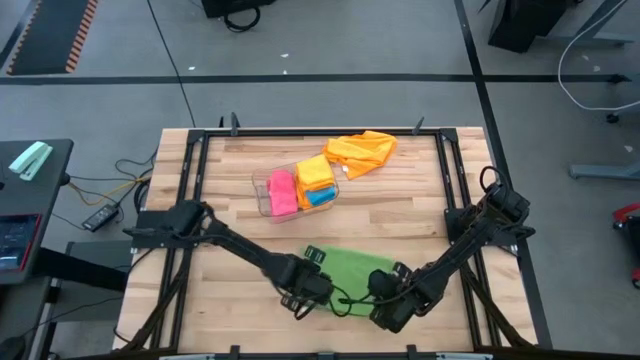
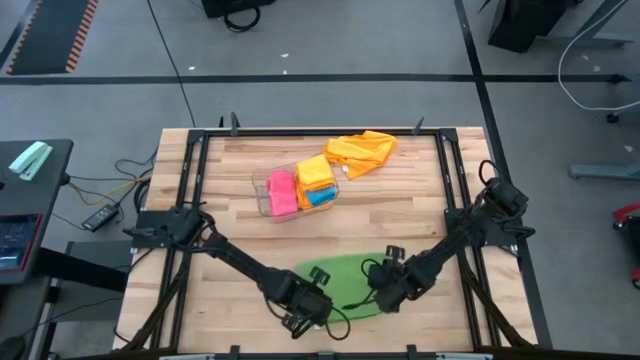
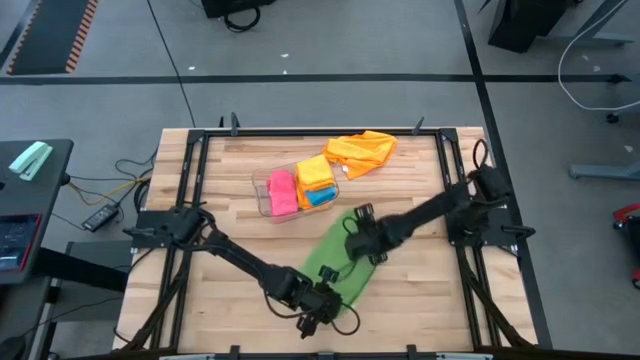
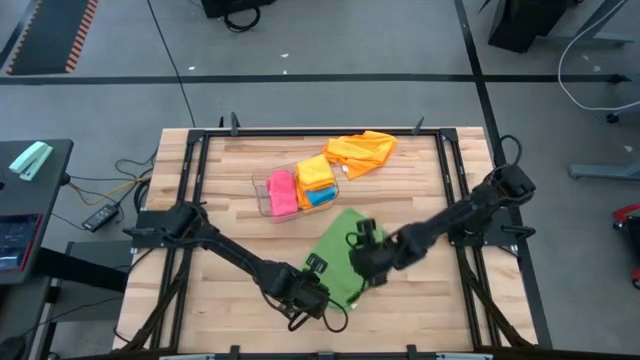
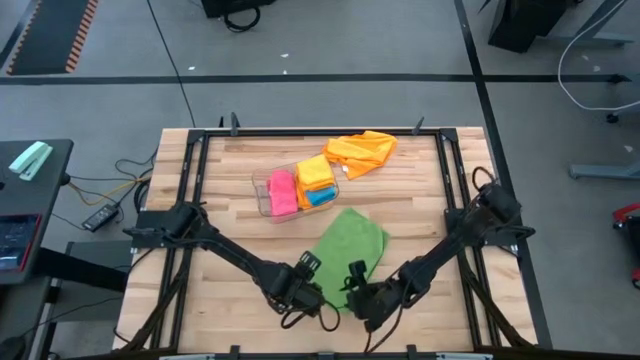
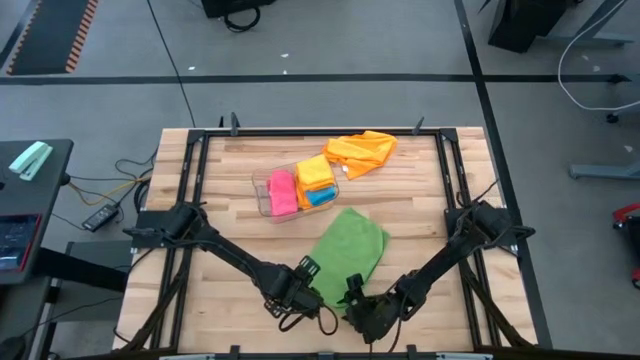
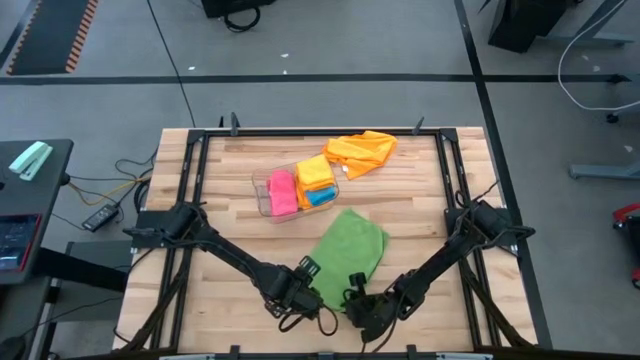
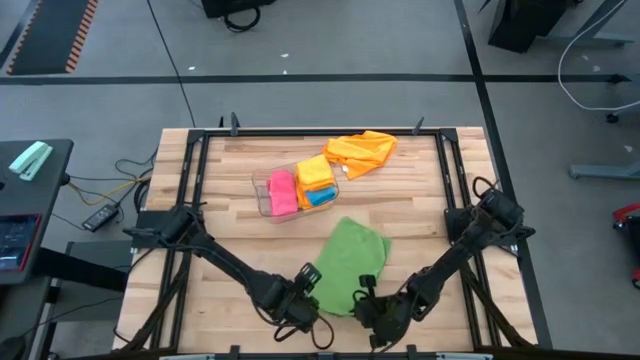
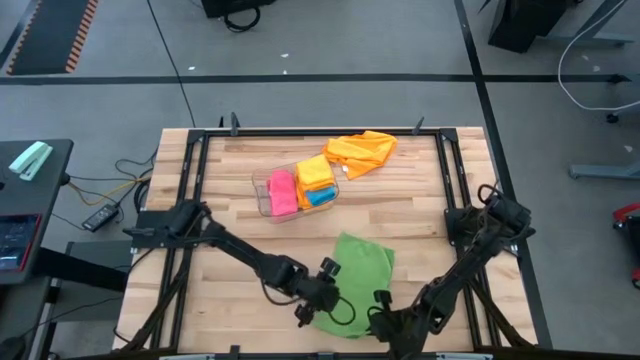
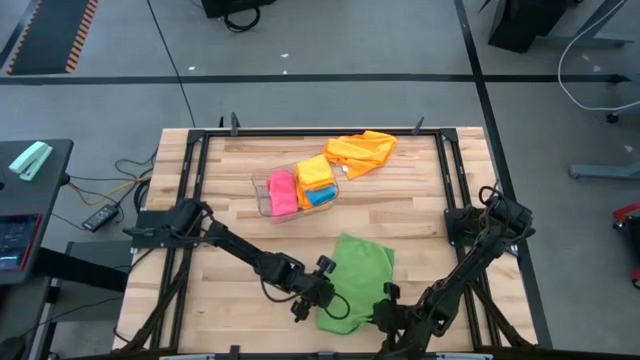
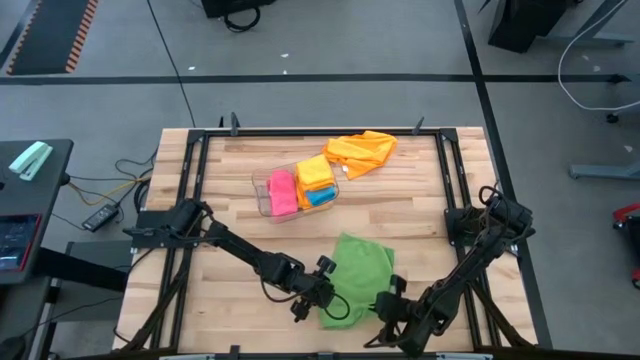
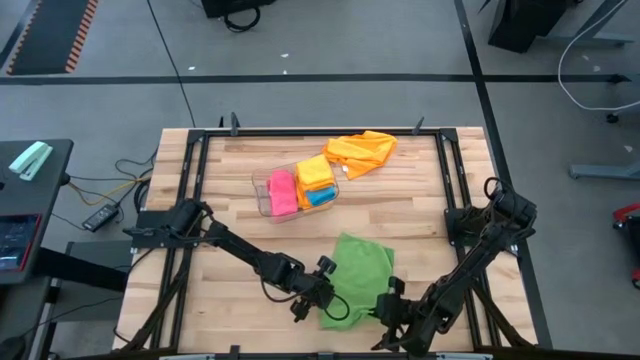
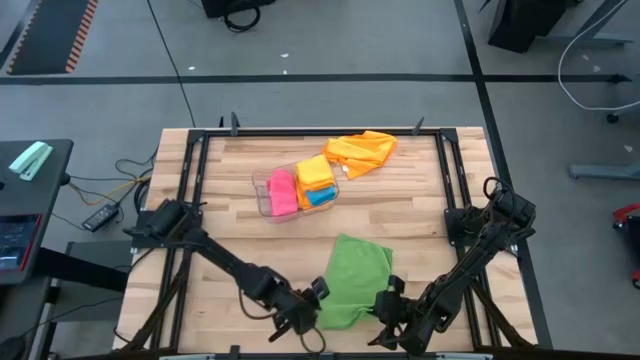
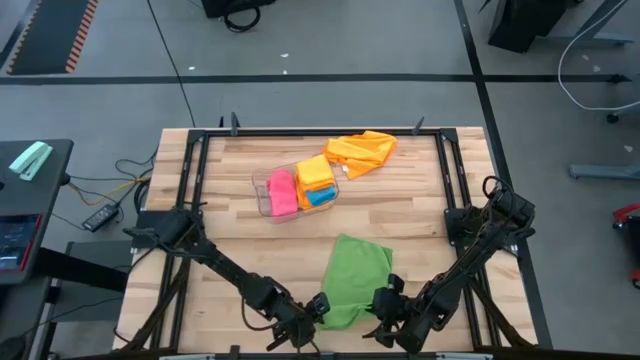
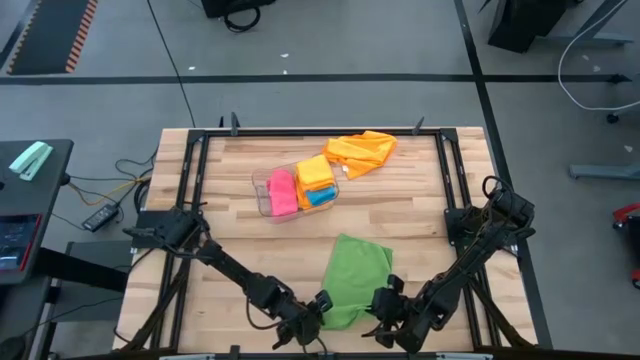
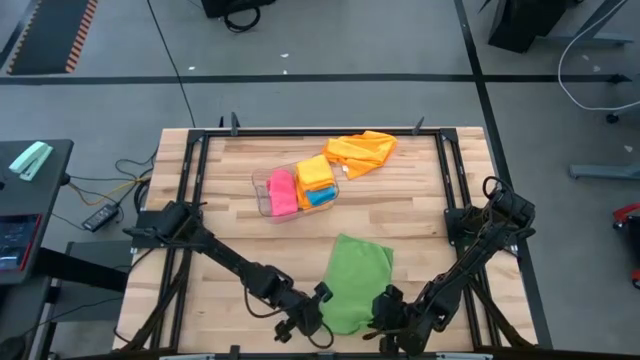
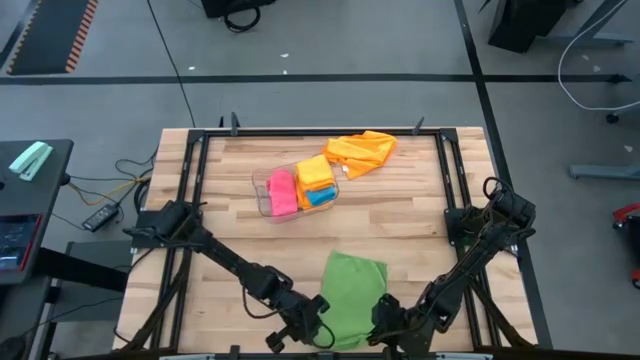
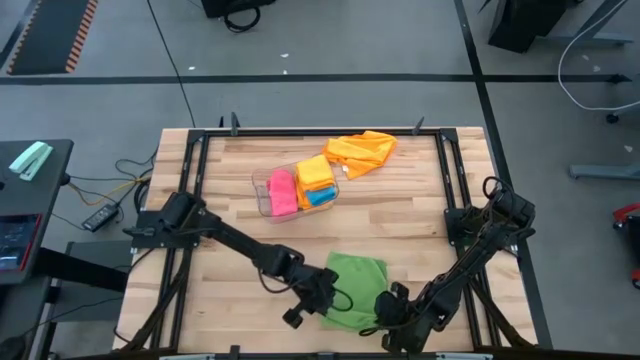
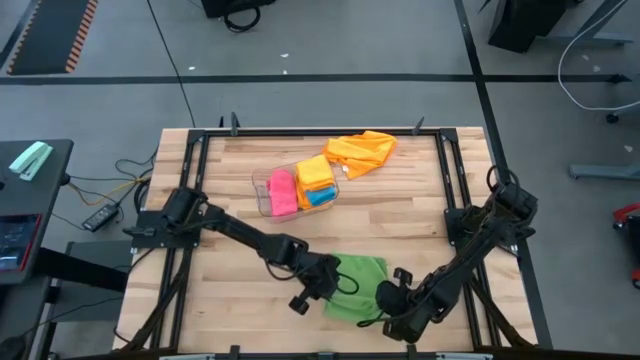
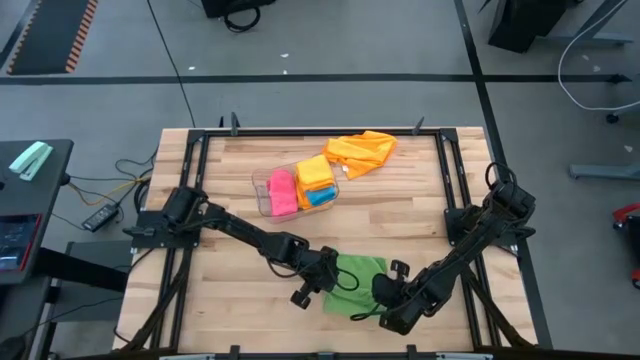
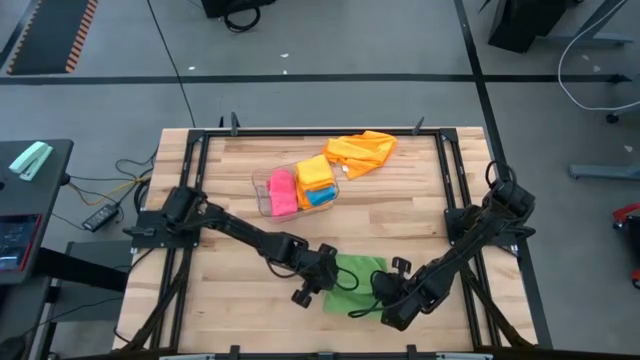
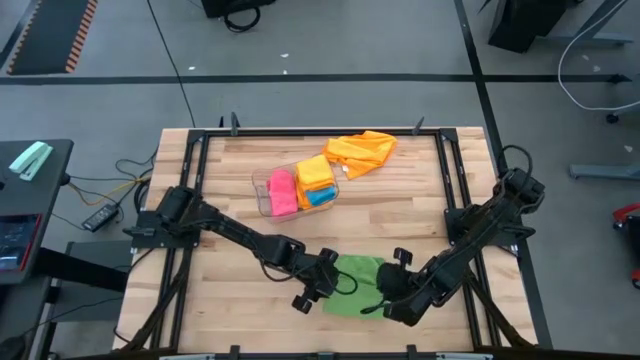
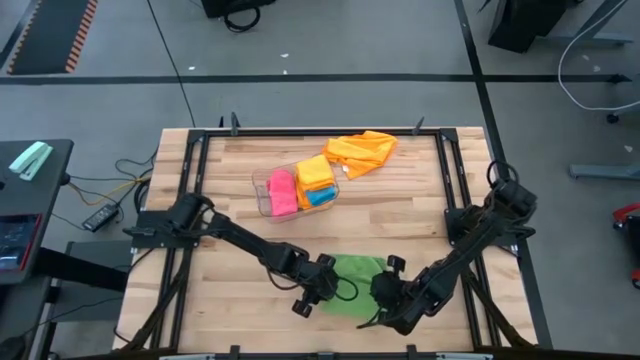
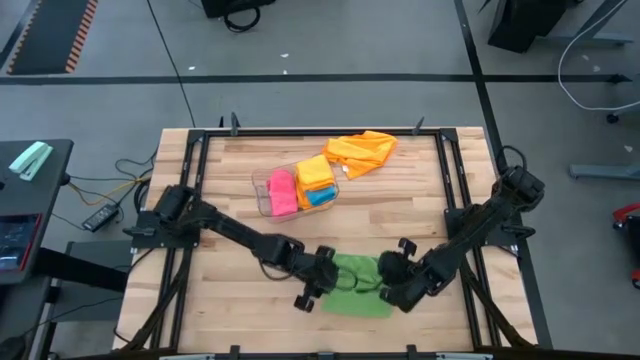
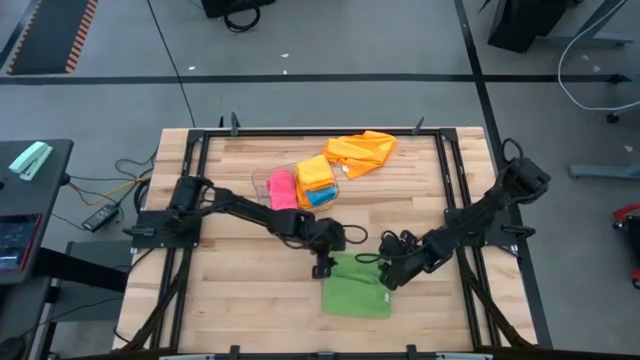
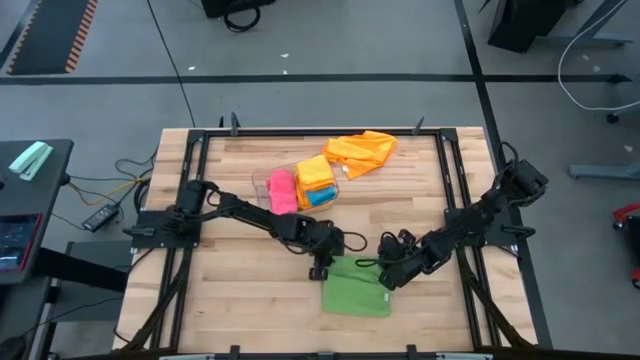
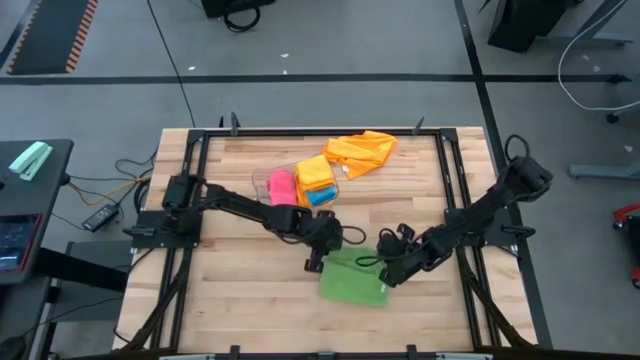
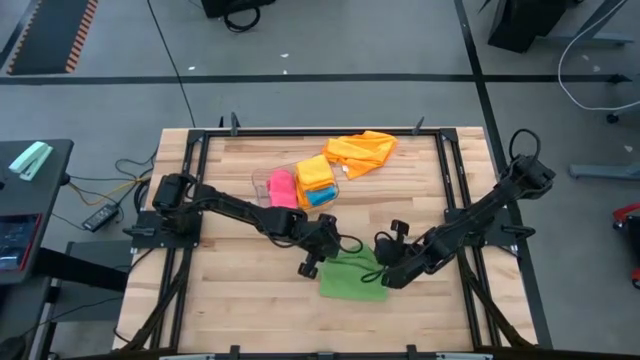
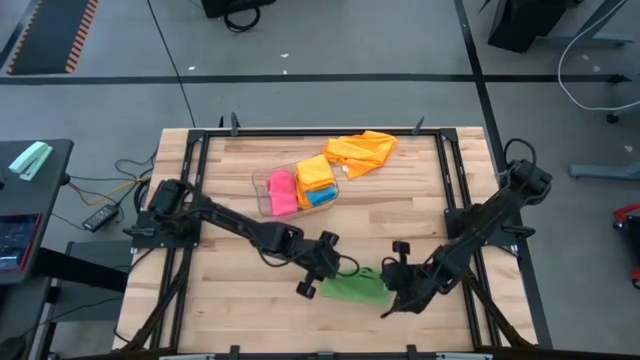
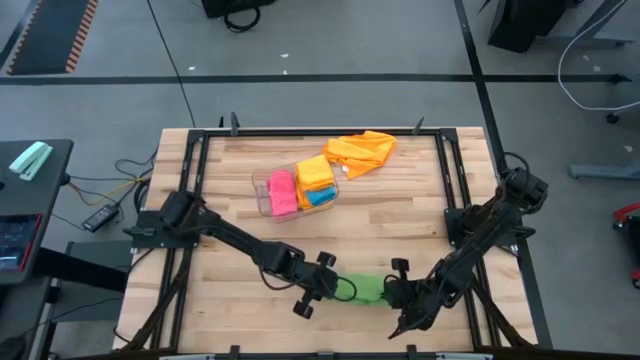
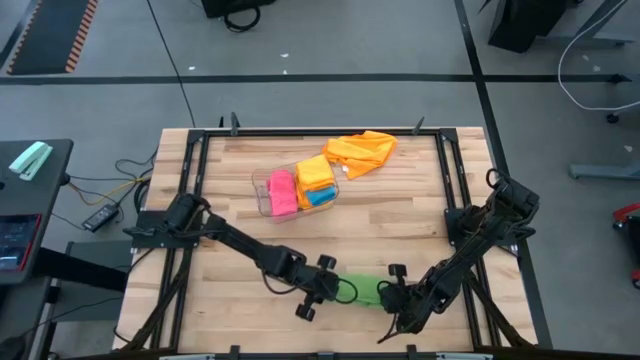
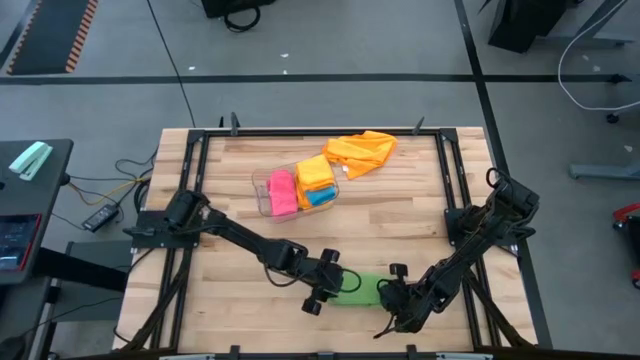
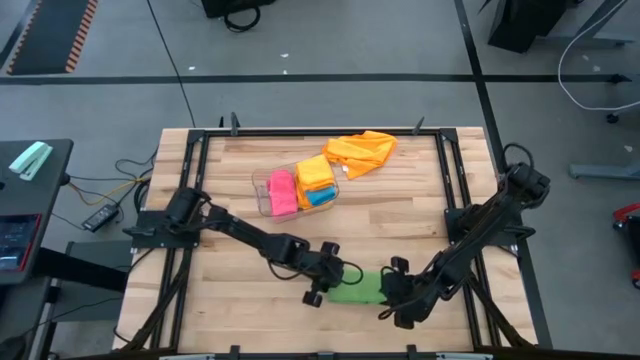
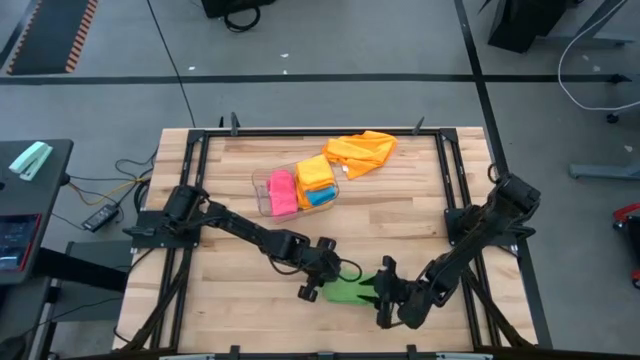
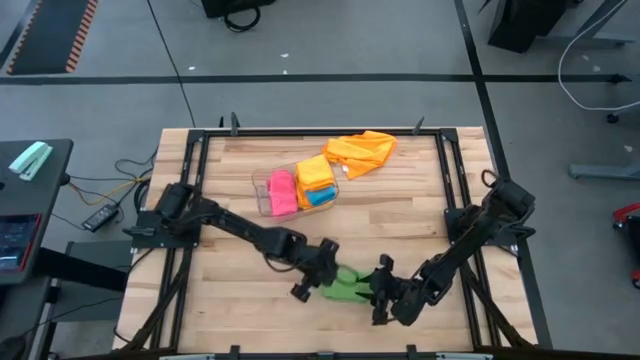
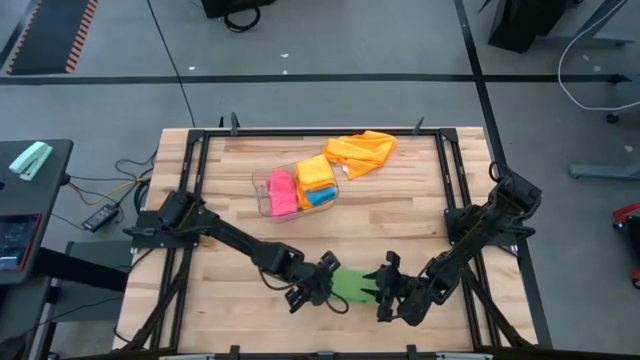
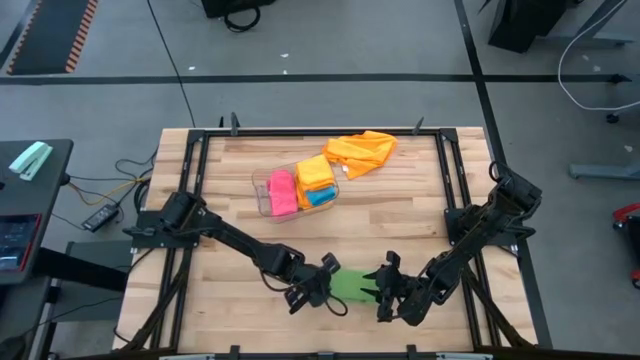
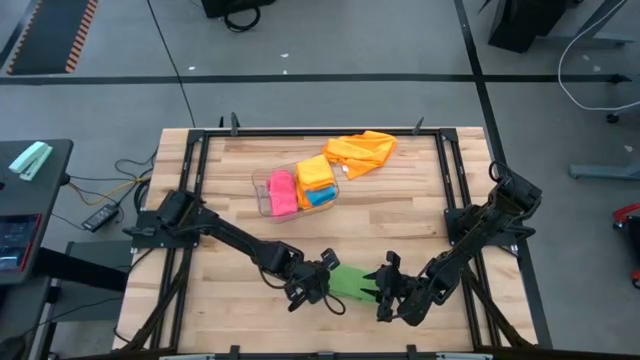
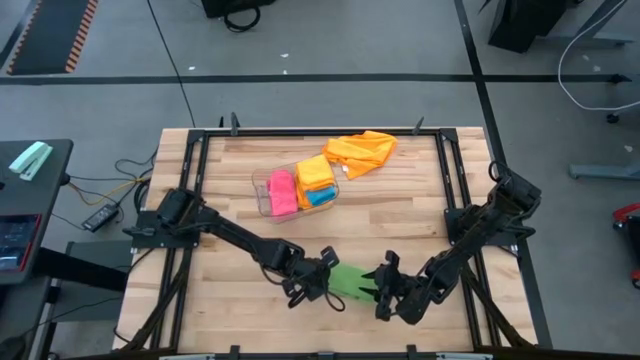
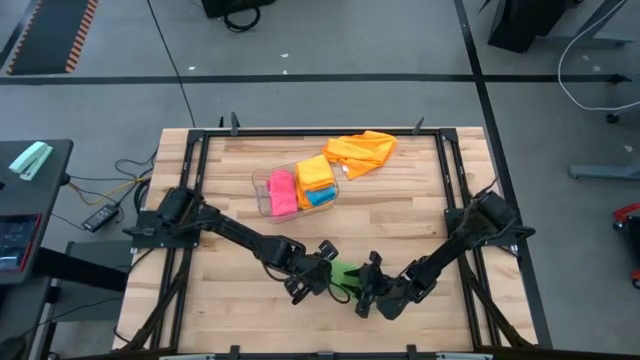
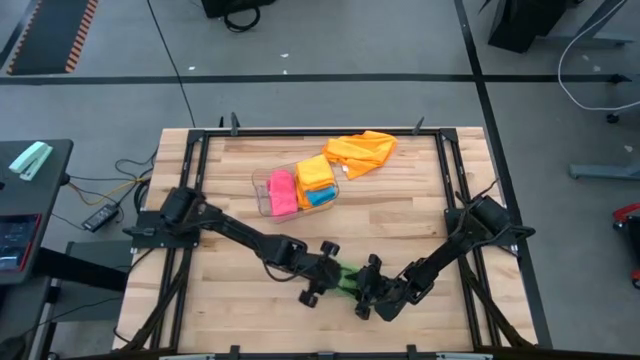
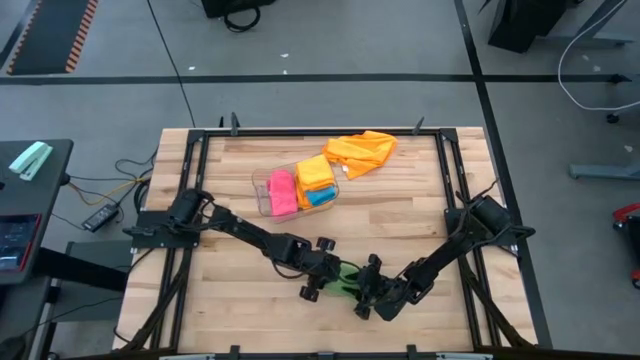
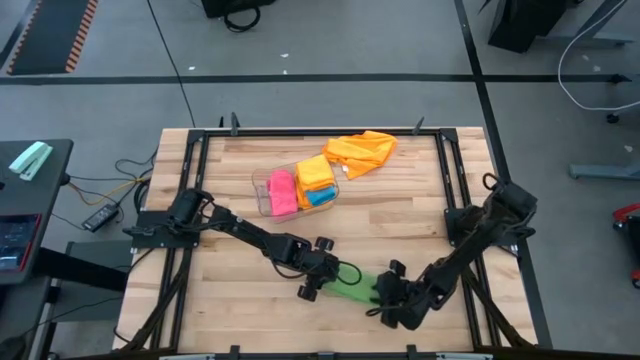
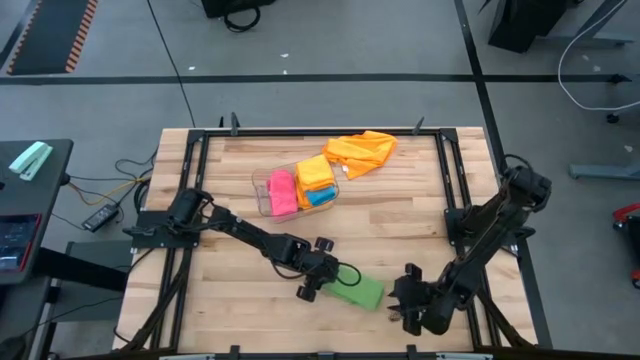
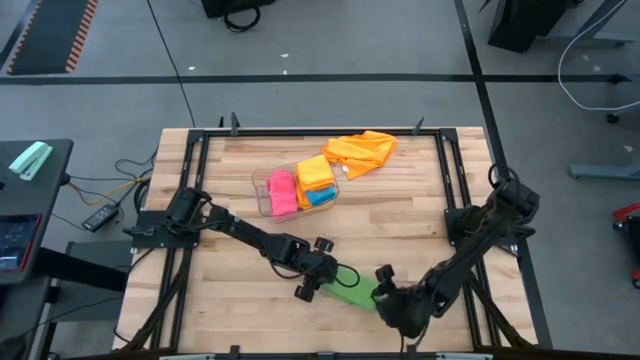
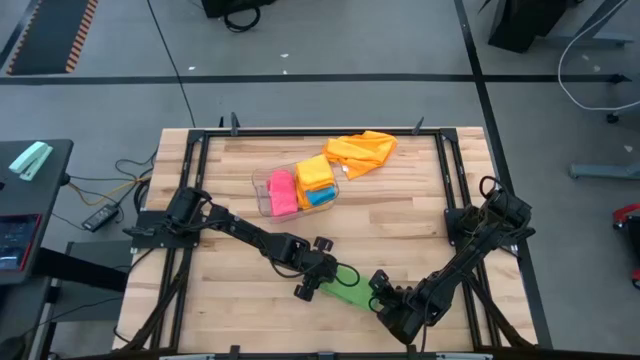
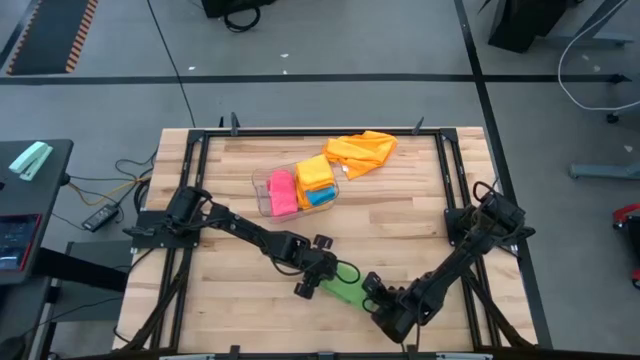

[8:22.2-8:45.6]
Task: Fold microfiber towels
Fold the green microfiber cloth
